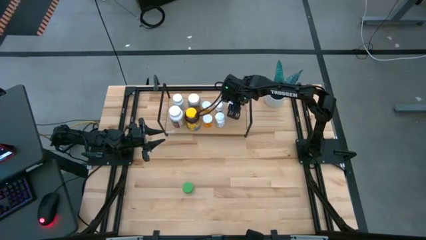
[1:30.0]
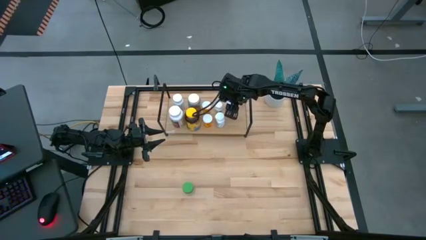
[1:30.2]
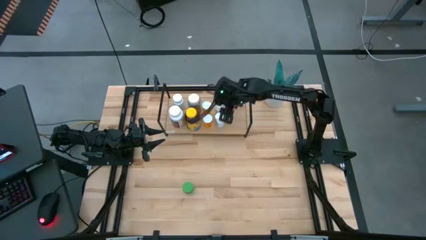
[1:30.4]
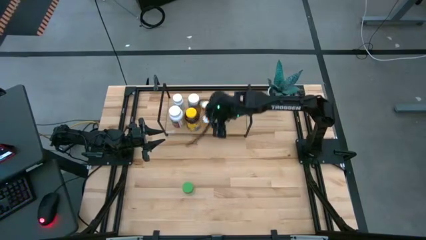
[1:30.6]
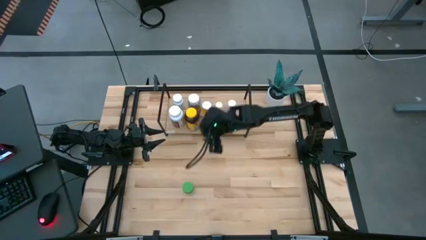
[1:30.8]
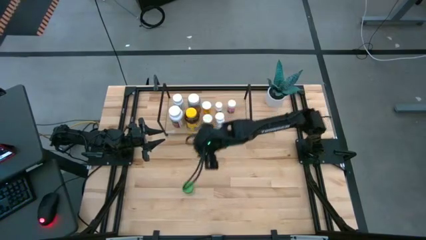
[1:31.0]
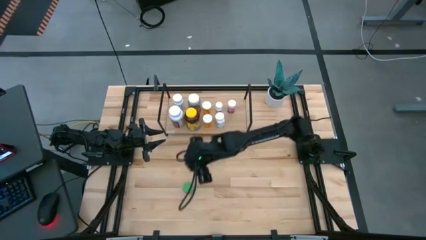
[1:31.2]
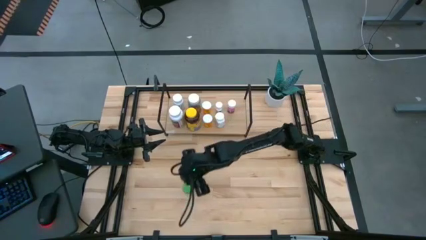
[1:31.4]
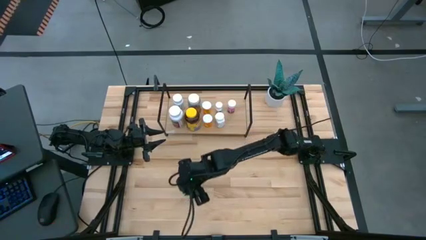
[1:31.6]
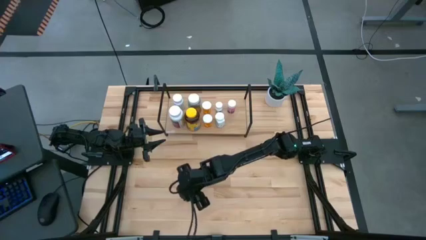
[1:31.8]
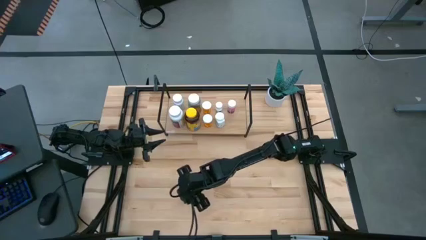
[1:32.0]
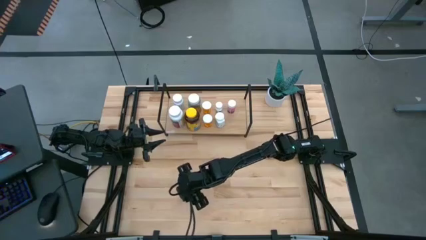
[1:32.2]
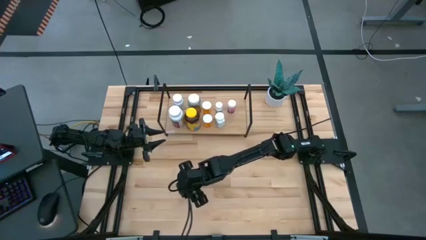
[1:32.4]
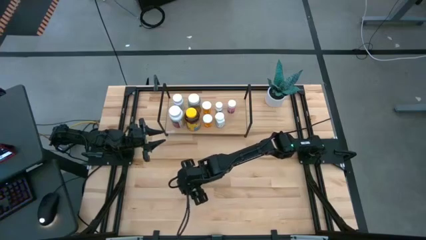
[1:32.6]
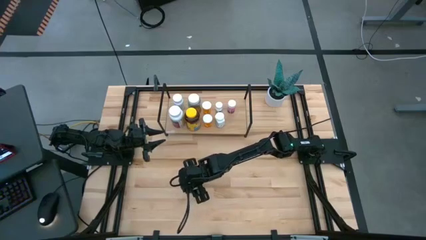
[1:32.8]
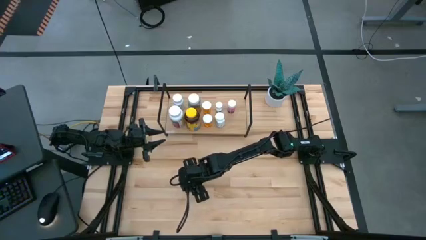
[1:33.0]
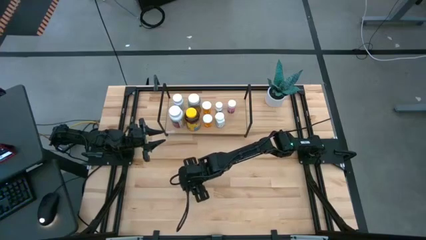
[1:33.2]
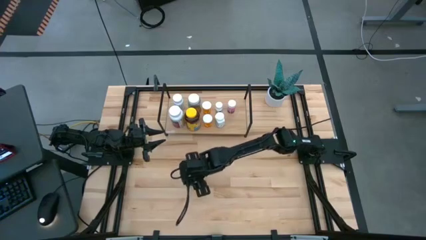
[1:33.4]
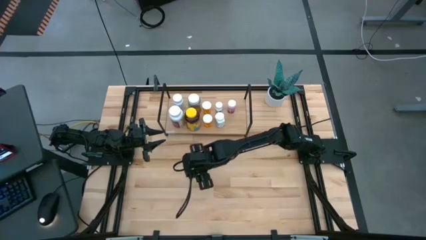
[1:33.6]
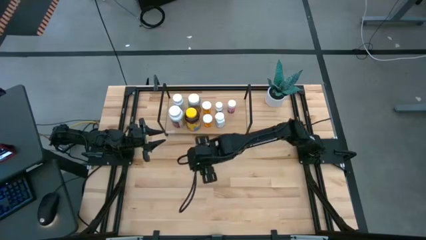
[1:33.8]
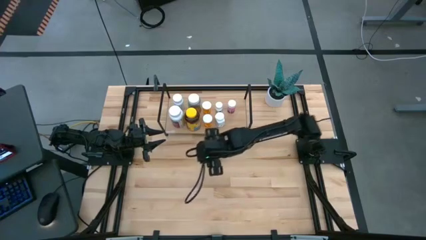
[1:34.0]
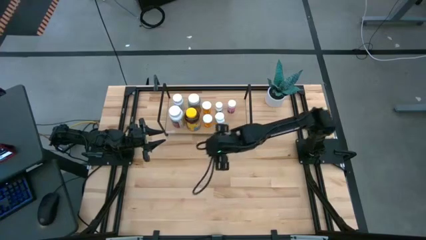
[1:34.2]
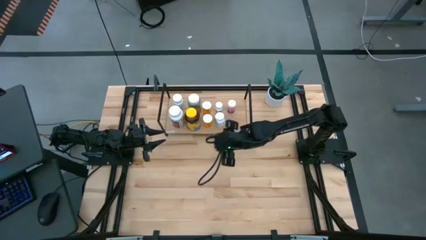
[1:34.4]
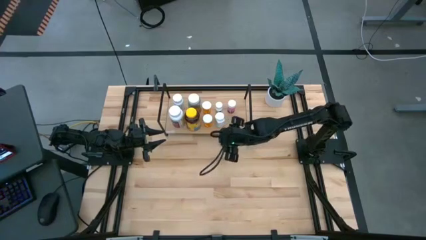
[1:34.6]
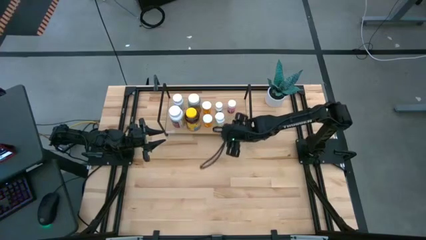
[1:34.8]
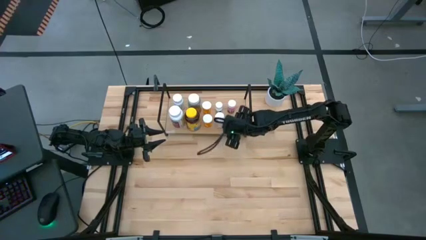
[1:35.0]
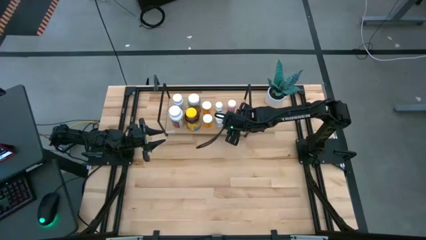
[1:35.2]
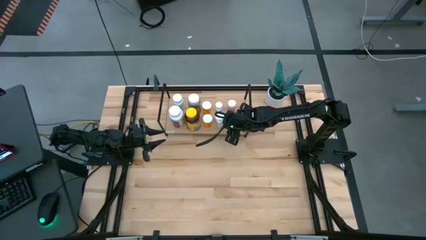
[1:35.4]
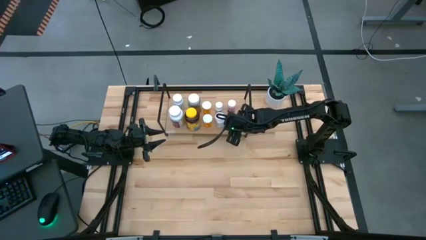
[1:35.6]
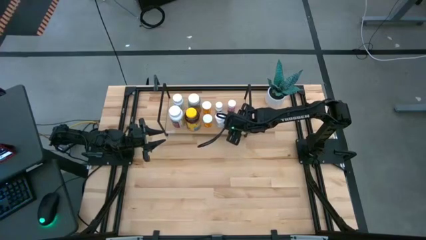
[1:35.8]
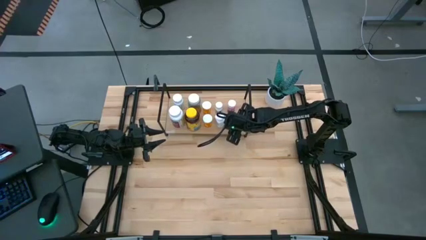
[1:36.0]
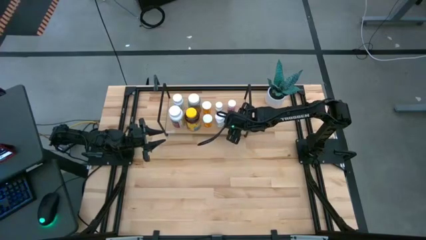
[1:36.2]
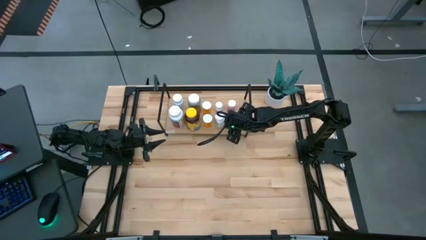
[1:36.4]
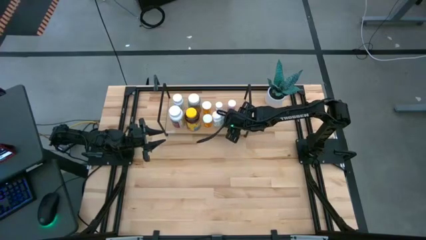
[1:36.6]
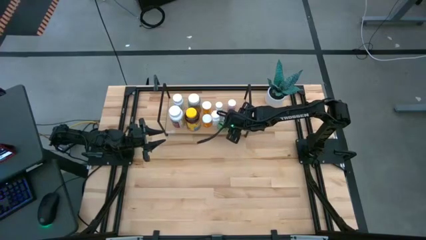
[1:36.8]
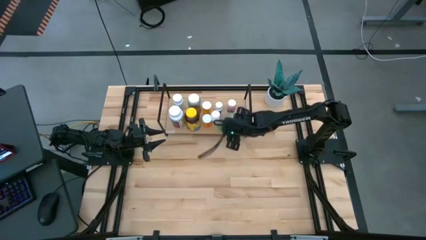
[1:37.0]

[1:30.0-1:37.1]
Task: Pick and place medicine bottles onto shelf by color
Put the green bottle on the shelf

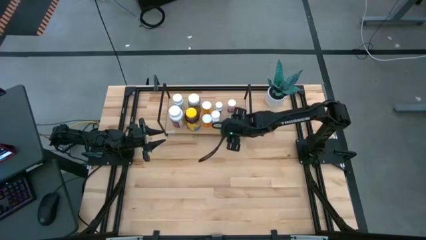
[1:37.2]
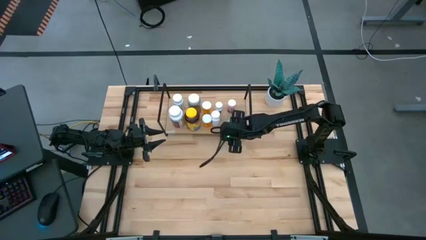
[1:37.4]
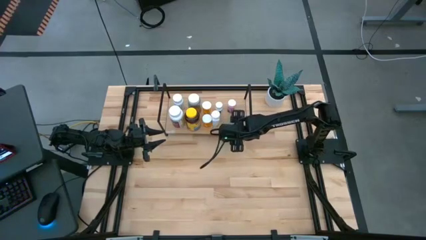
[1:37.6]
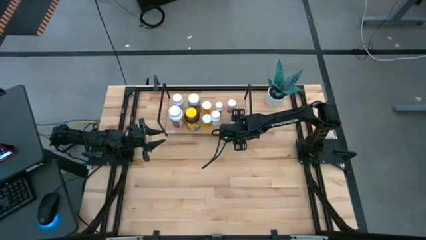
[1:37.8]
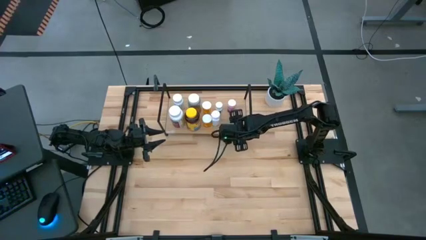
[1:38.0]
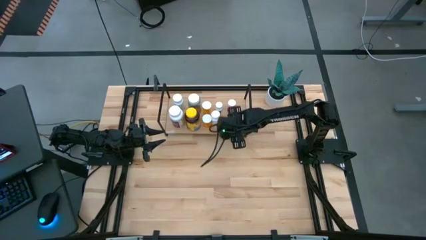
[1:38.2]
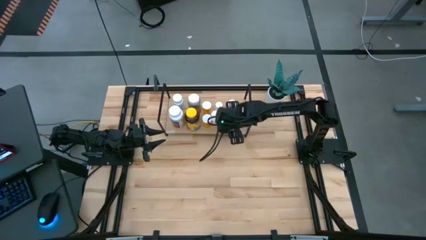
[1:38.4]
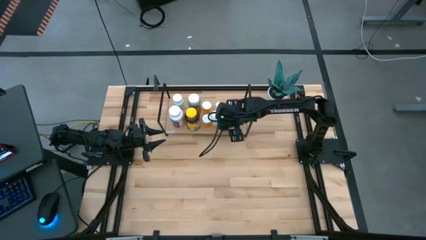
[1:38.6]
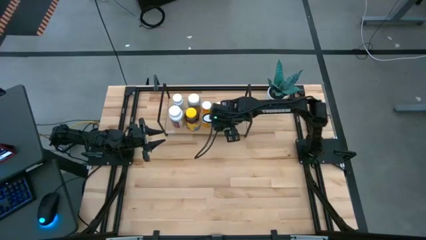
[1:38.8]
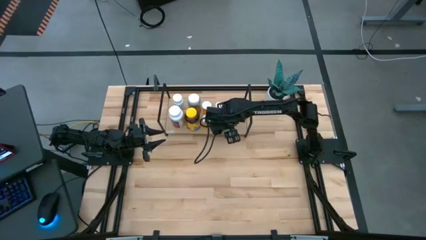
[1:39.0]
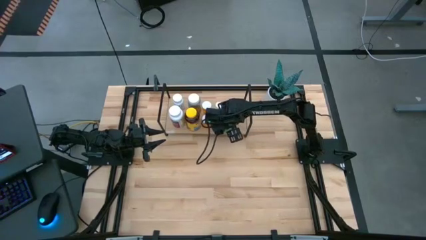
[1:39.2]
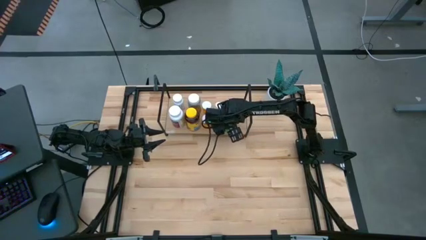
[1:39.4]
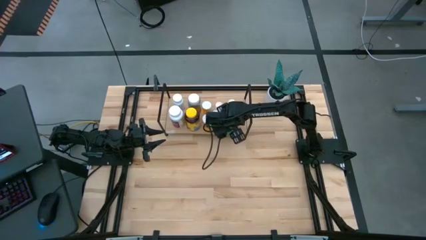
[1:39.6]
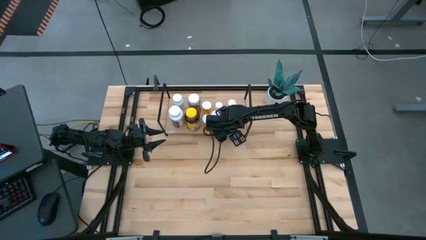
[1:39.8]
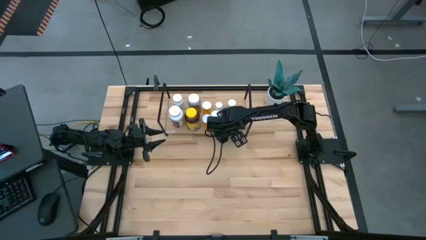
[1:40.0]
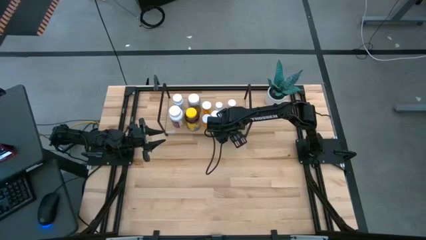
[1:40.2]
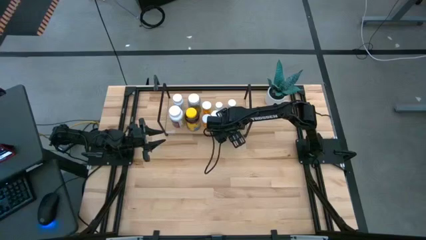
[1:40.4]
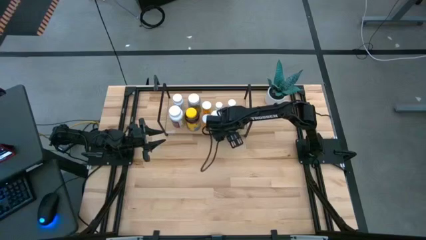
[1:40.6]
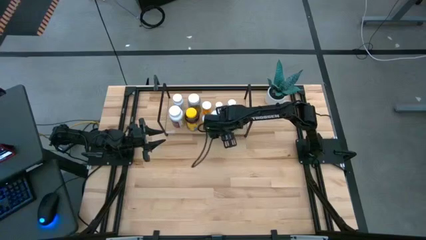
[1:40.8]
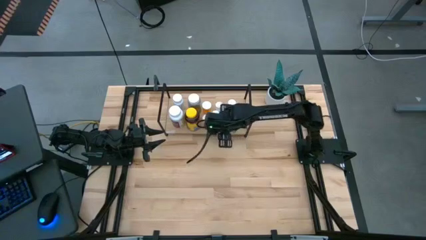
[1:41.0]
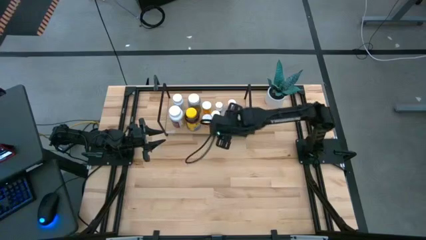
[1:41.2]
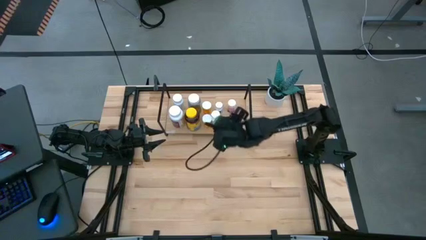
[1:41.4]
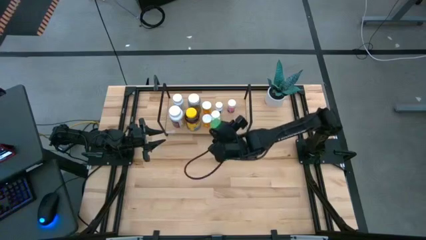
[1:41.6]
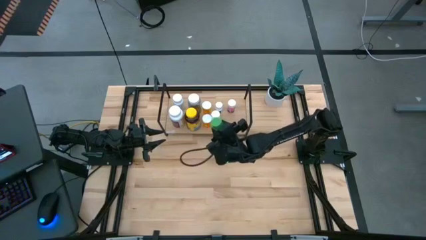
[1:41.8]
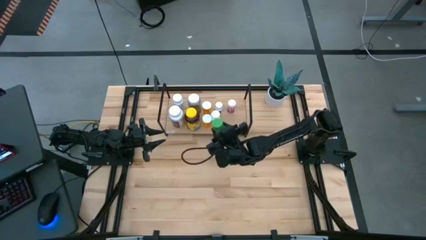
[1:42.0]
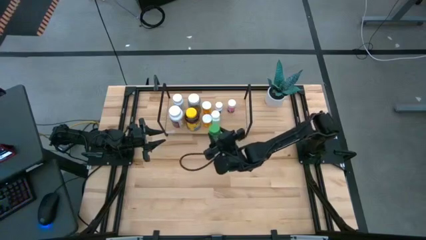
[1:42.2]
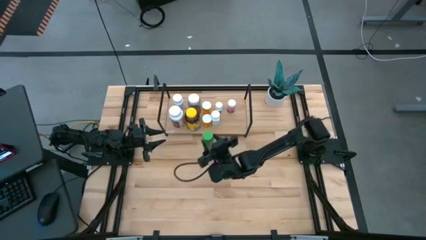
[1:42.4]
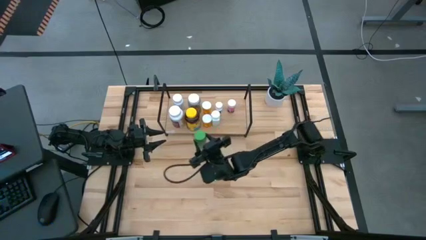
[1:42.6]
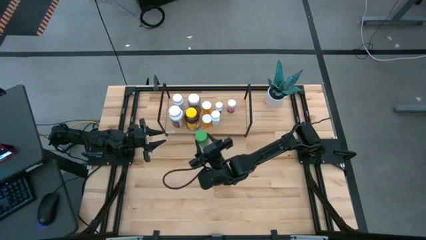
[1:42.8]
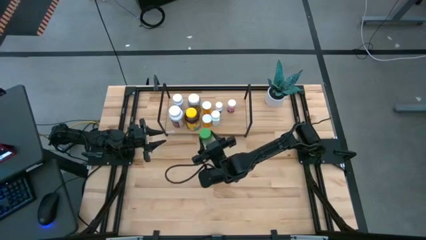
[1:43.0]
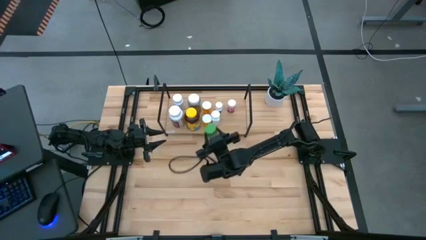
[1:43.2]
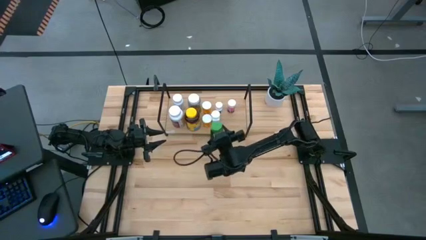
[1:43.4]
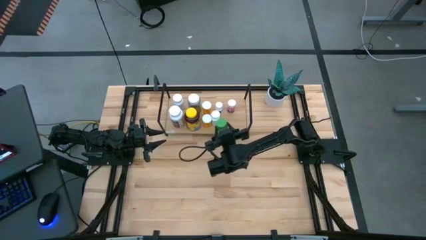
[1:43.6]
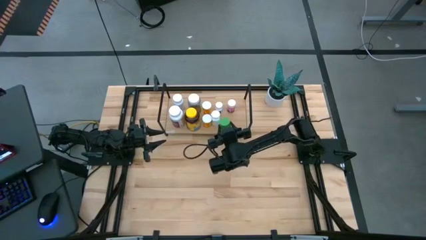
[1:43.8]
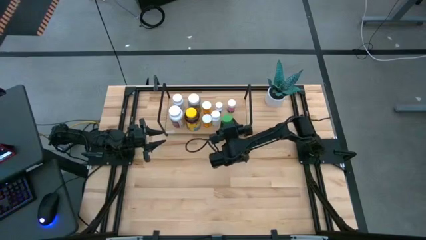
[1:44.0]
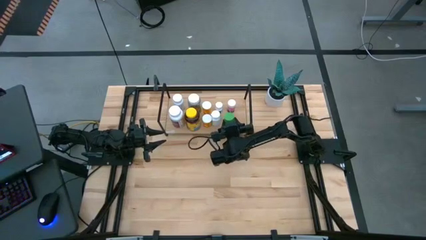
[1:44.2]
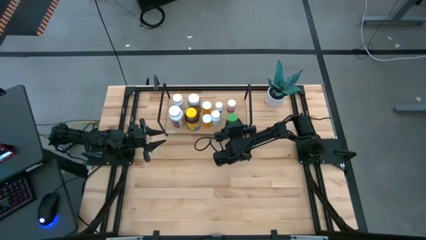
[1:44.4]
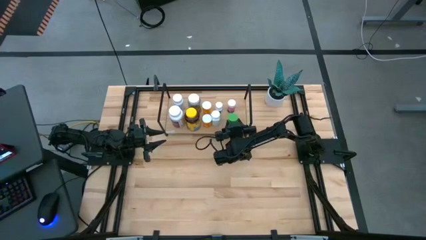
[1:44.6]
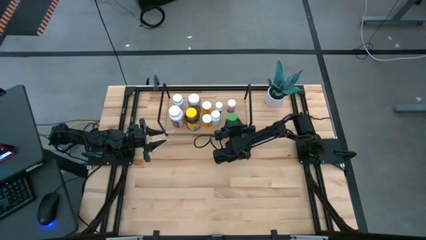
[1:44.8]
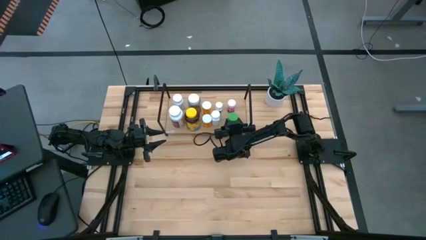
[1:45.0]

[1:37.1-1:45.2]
Put the green bottle on the shelf

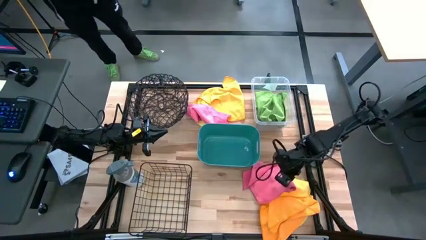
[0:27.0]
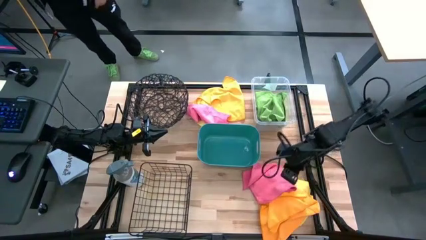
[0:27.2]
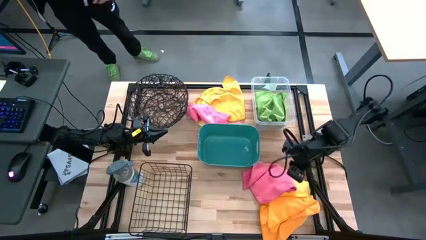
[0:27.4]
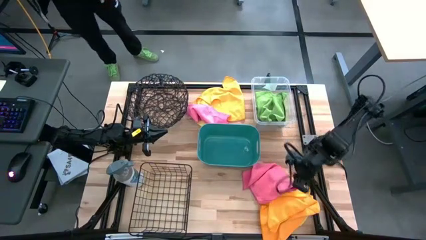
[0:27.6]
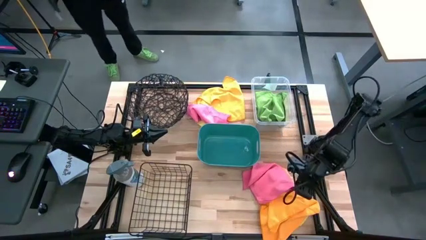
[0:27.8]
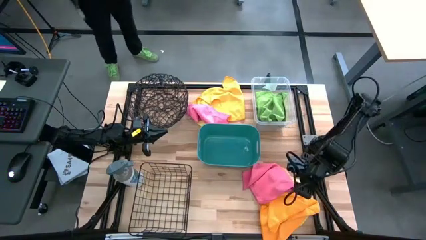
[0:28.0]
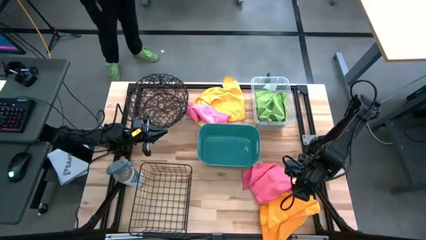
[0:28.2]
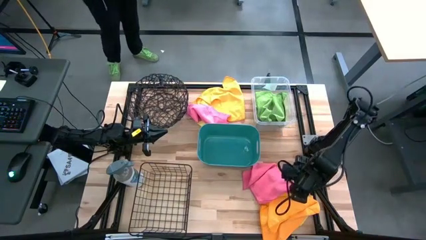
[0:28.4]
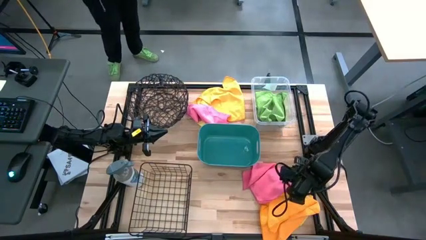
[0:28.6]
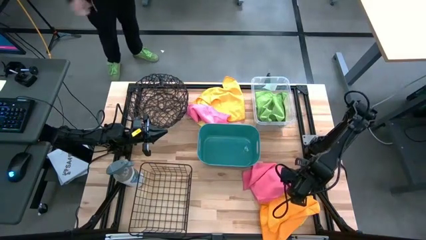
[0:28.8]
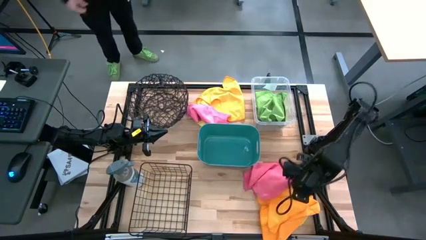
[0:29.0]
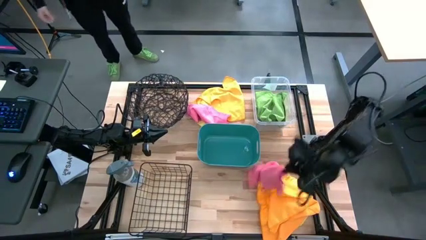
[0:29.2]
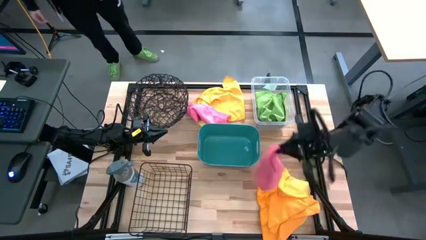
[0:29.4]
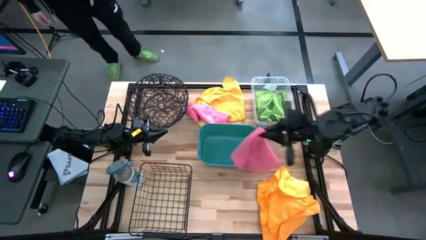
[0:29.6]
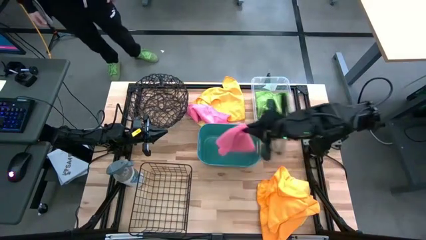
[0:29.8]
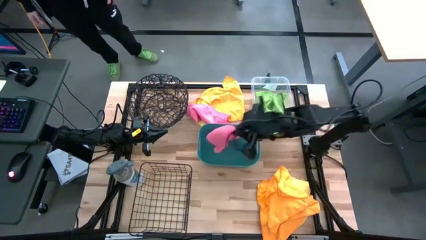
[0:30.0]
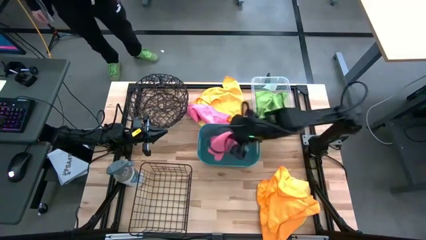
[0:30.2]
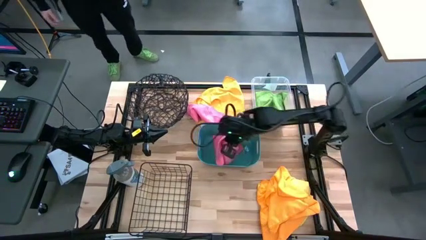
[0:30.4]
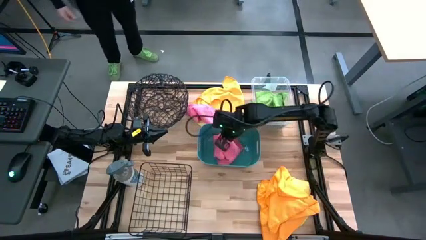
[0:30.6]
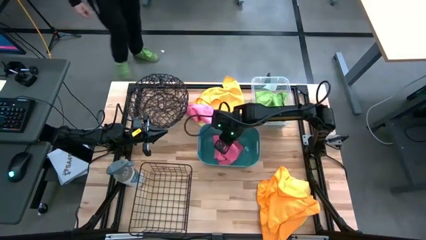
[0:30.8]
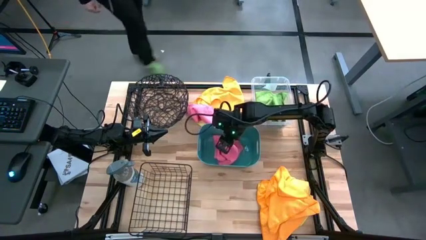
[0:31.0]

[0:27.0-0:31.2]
Task: Sort microfiber towel by color & place in baskets
Put the pink microfiber cloth into the green bin
